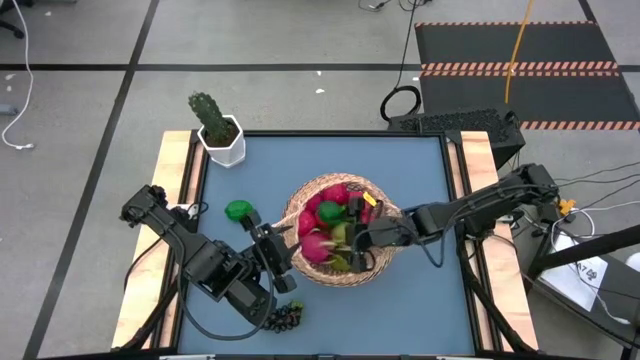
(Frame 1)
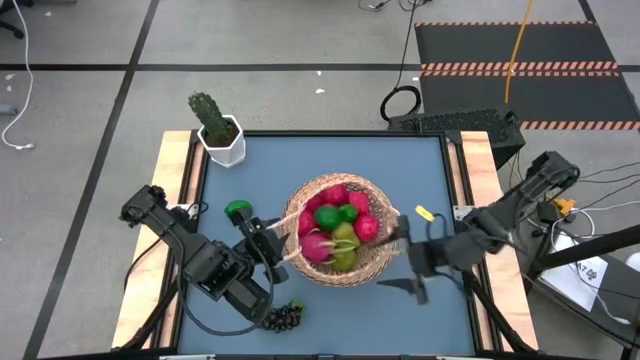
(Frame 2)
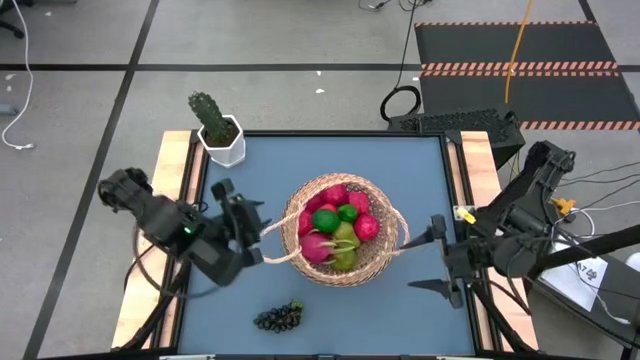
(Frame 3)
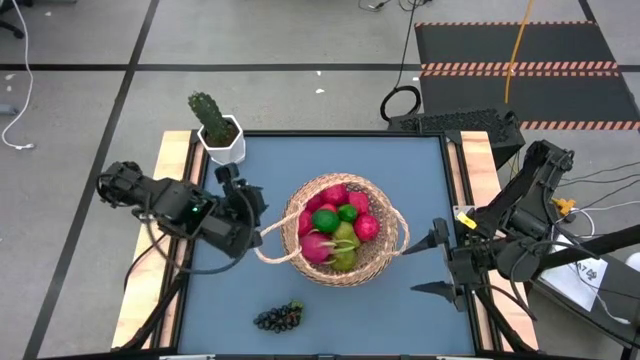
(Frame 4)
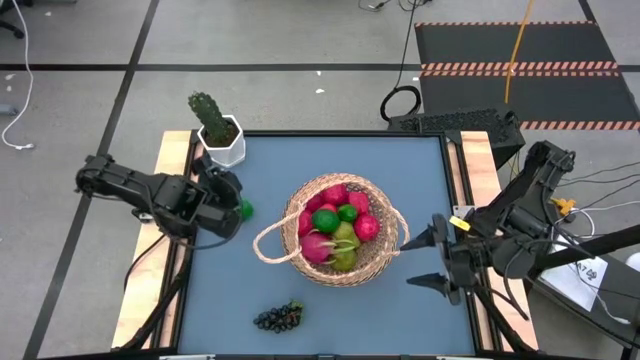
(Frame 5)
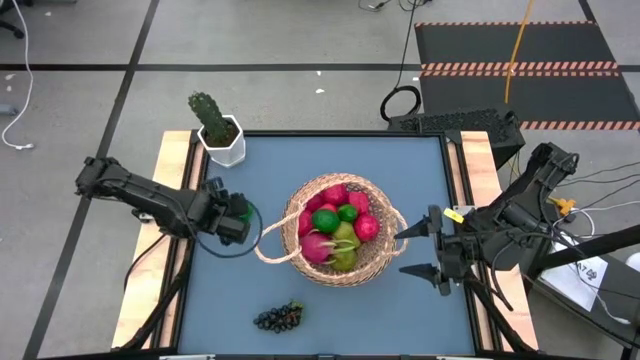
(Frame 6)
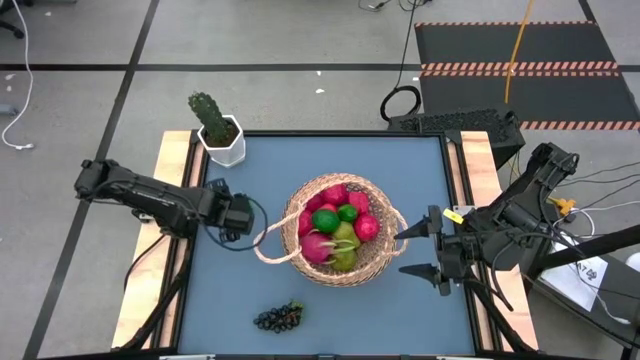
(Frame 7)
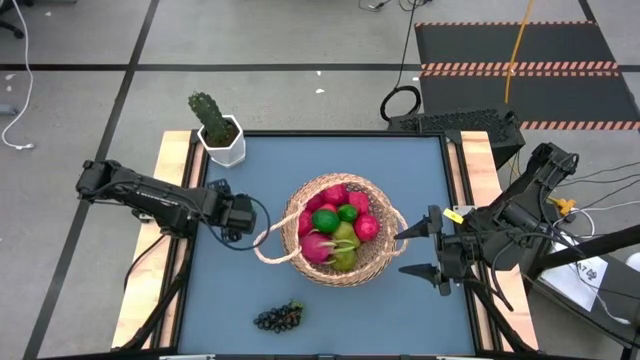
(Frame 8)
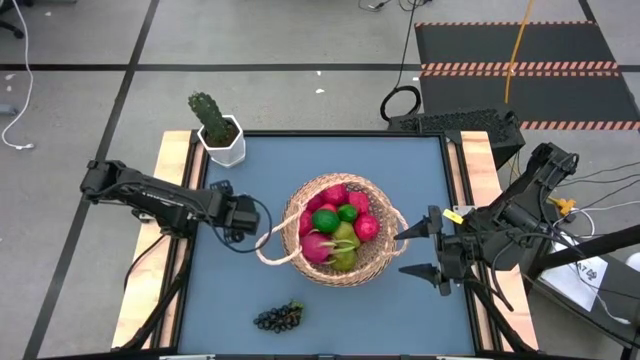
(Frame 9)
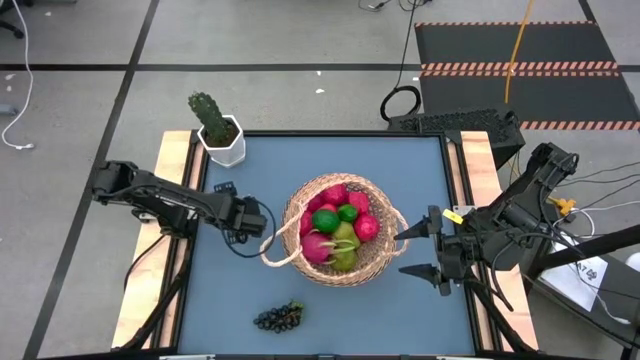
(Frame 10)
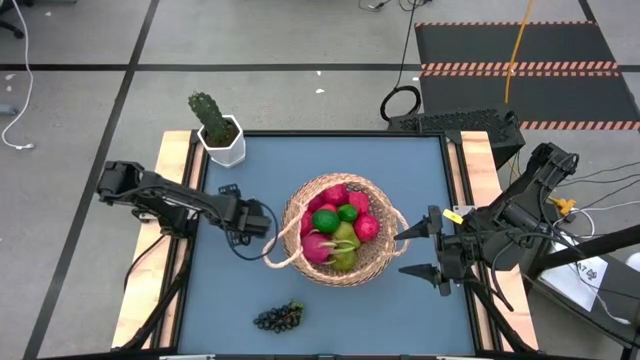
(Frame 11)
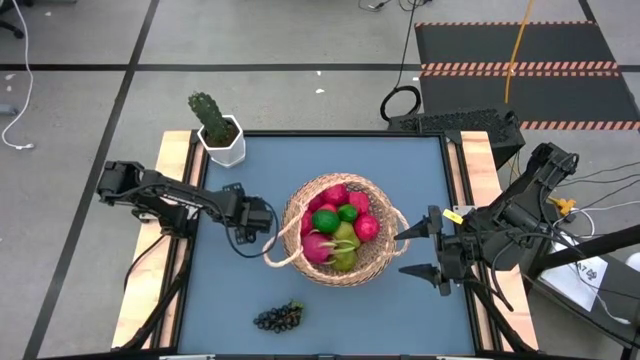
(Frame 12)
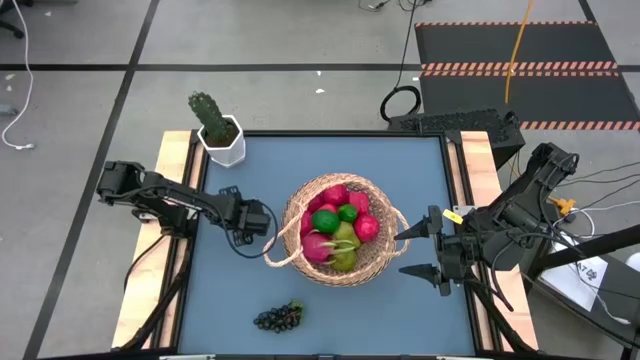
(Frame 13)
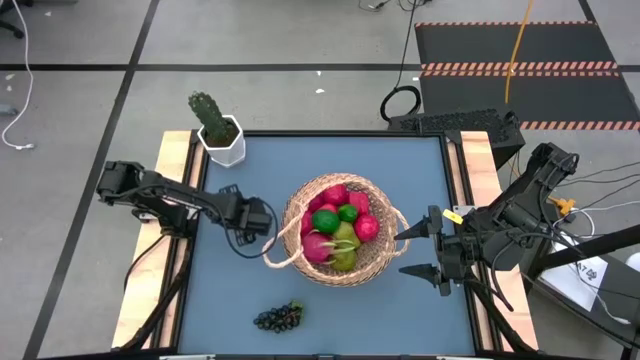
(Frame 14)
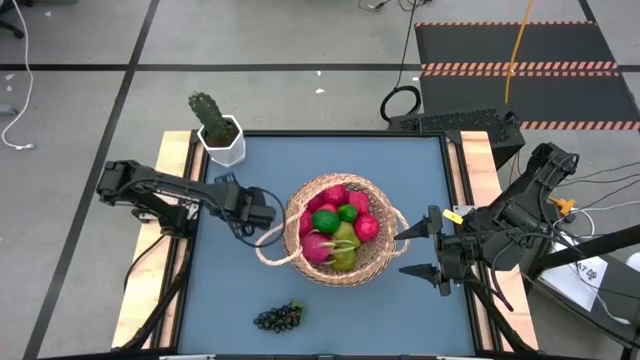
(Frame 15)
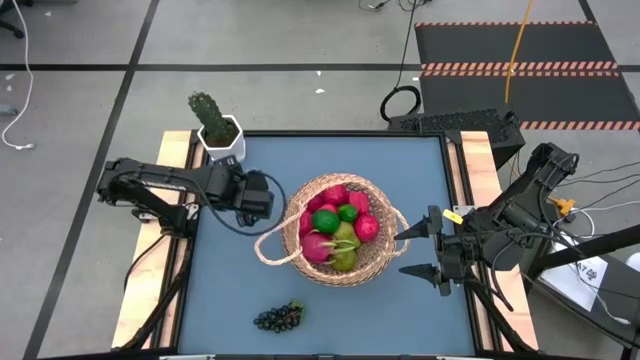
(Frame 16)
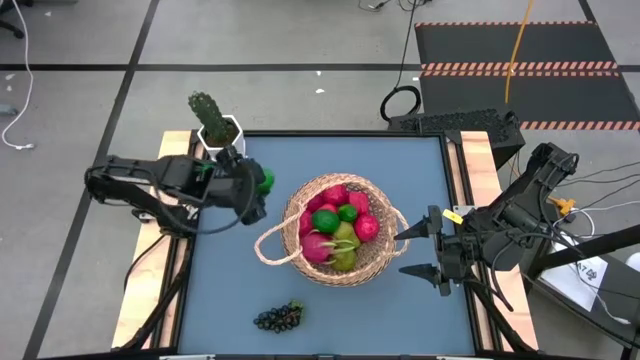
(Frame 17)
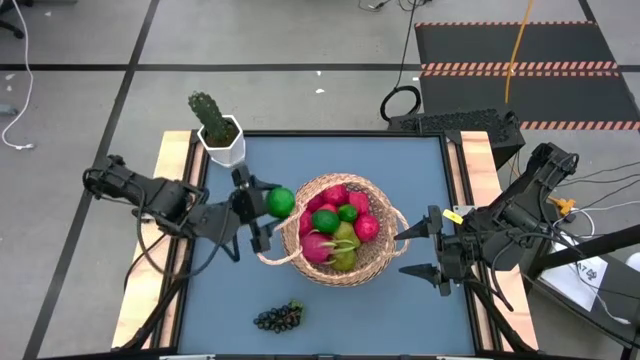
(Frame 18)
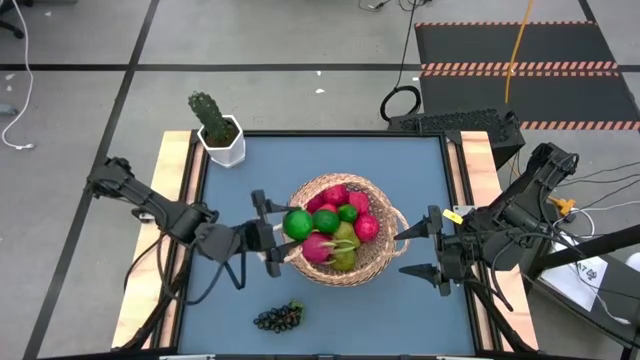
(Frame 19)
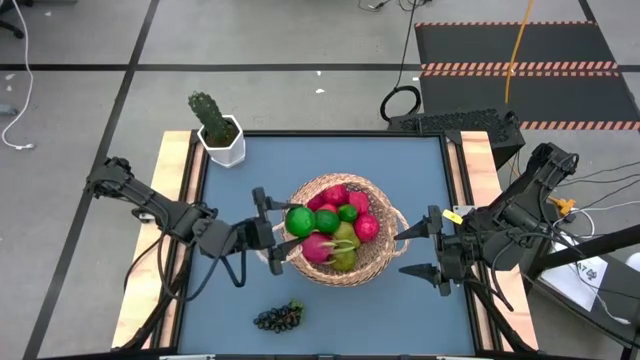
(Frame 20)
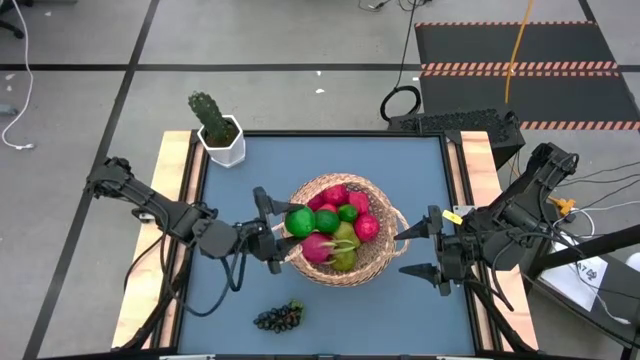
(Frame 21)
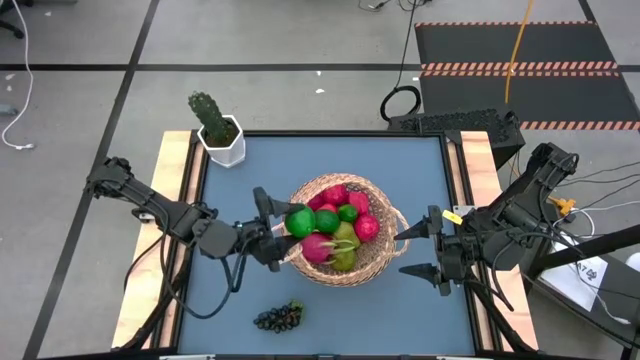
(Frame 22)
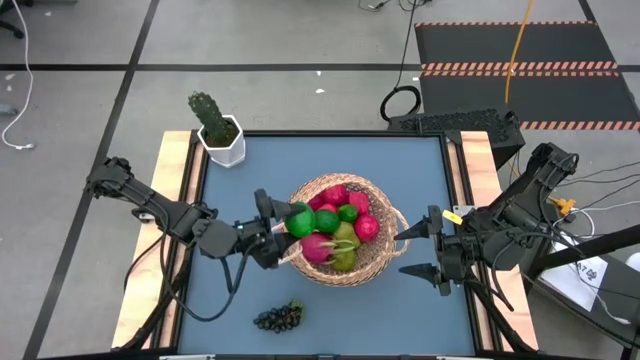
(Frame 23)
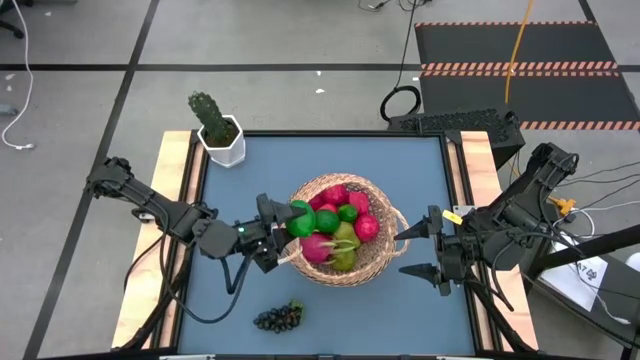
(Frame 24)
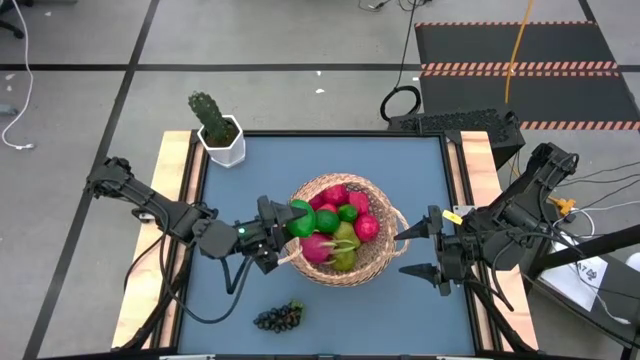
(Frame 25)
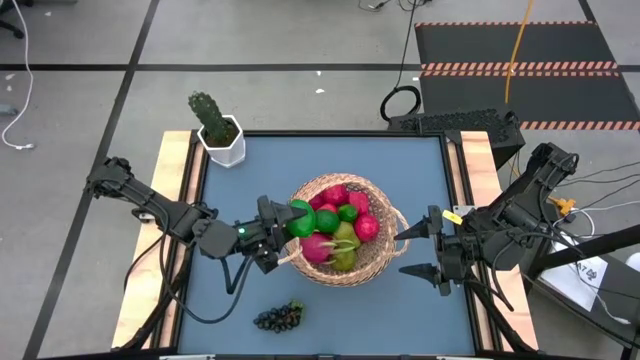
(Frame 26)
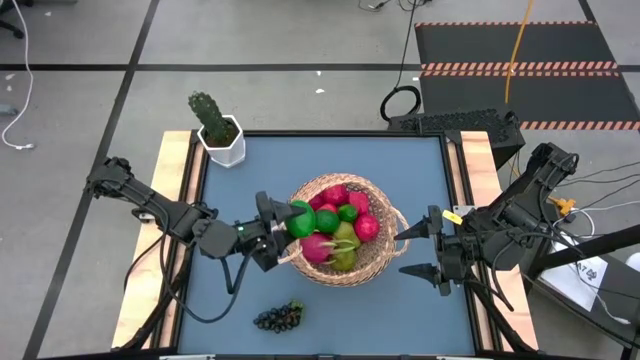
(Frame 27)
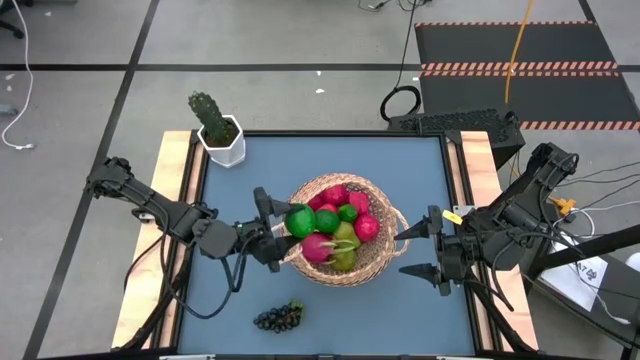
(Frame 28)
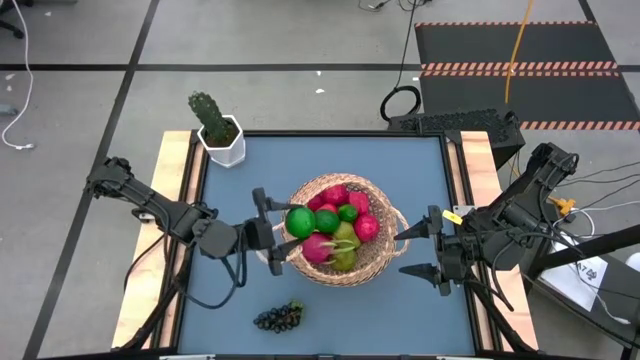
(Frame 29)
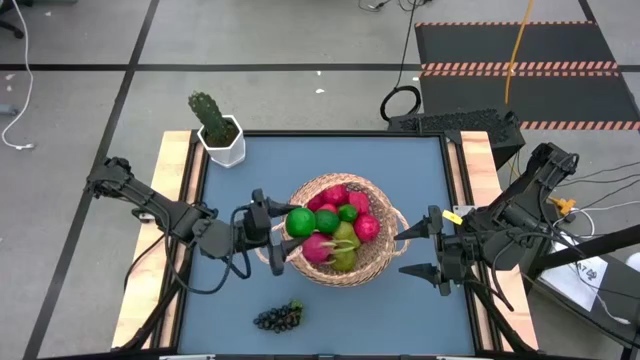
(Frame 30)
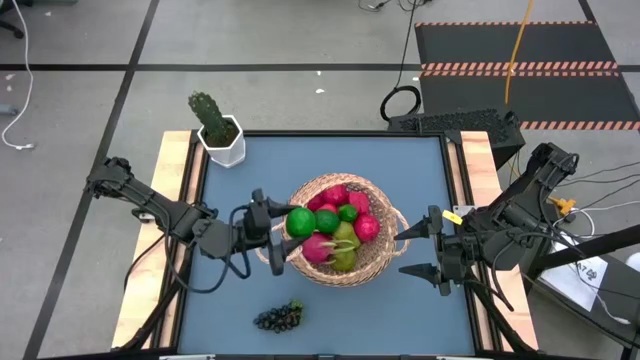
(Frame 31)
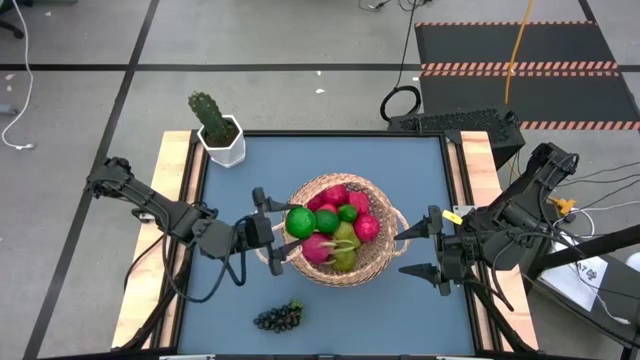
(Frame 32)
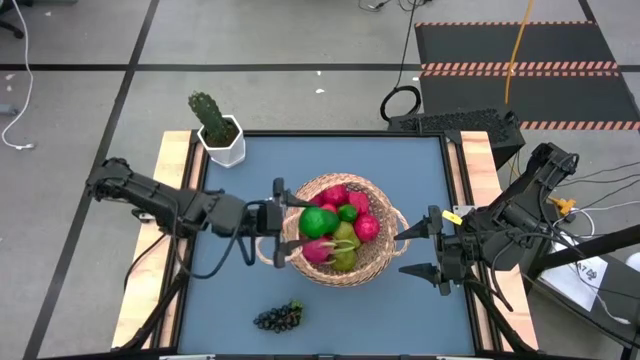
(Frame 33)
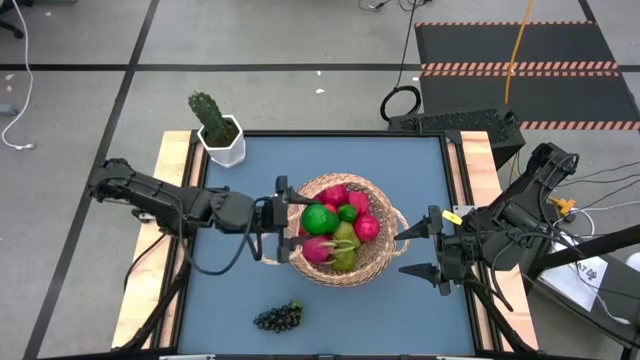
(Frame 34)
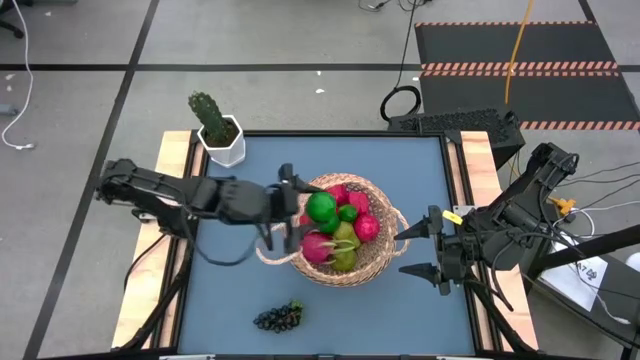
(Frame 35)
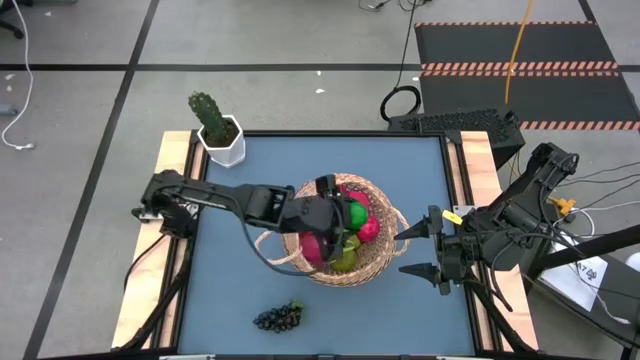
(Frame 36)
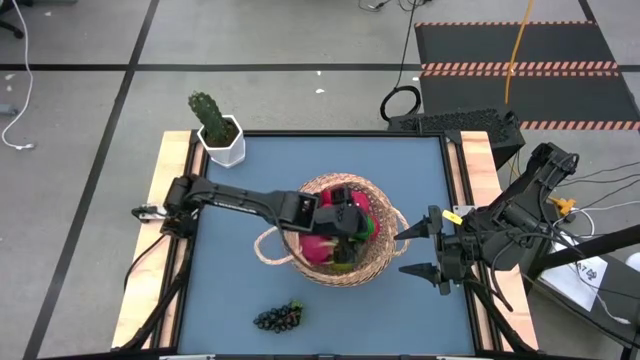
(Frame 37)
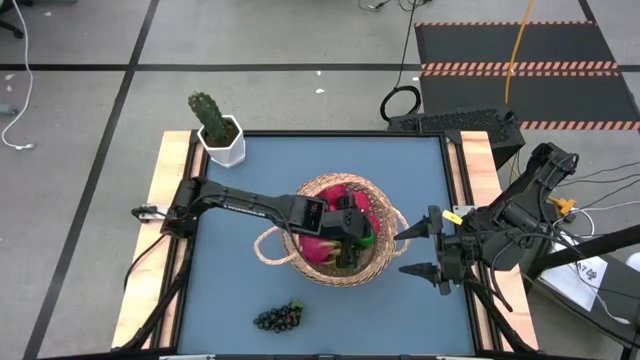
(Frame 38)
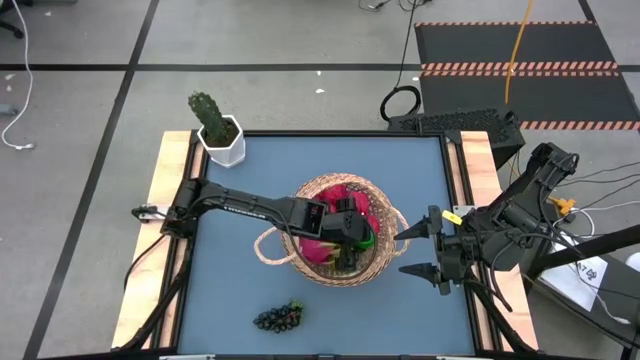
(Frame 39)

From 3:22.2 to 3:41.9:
Task: Build produce basket
Put the dark green lime into the brown basket

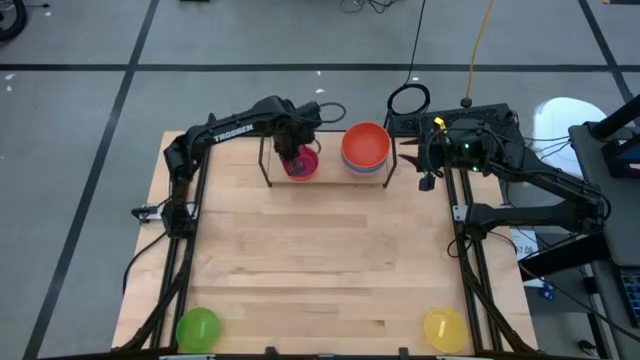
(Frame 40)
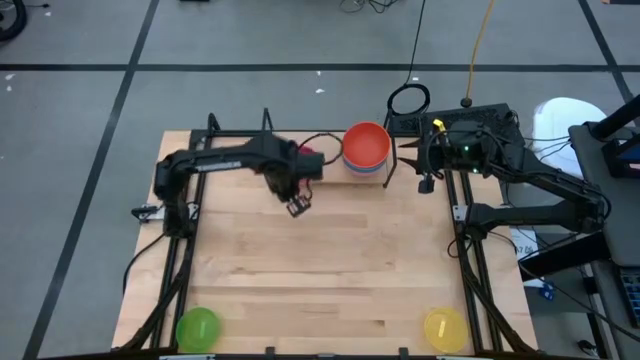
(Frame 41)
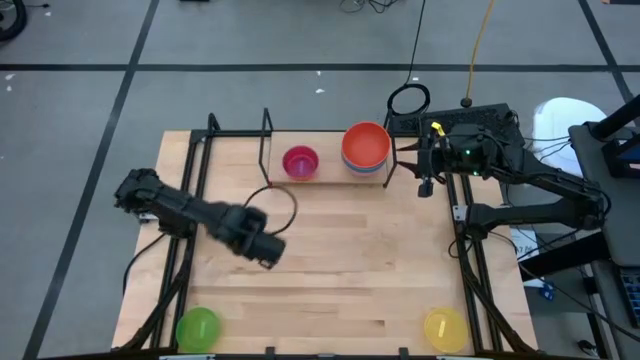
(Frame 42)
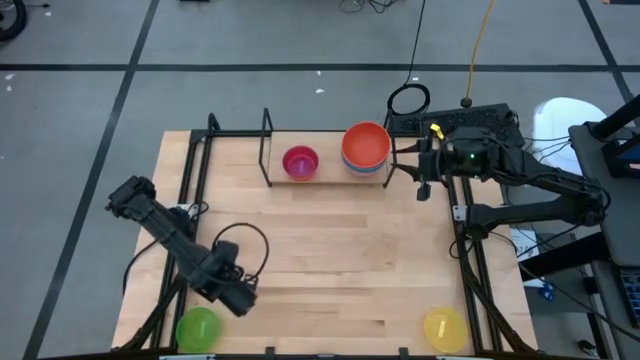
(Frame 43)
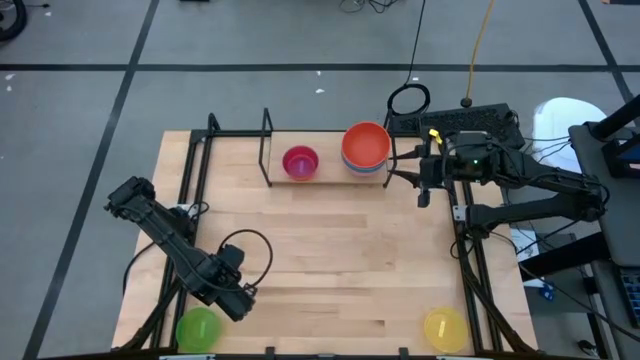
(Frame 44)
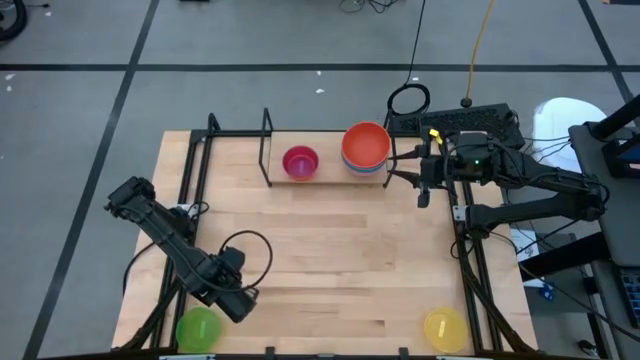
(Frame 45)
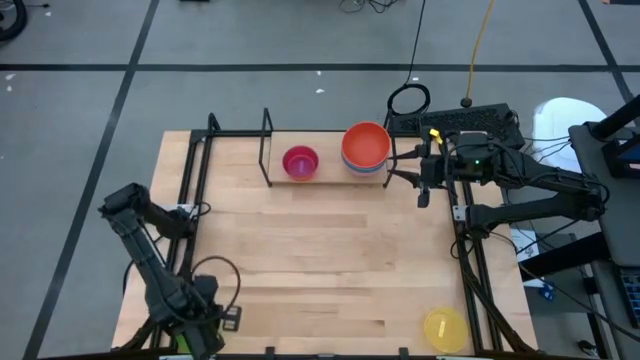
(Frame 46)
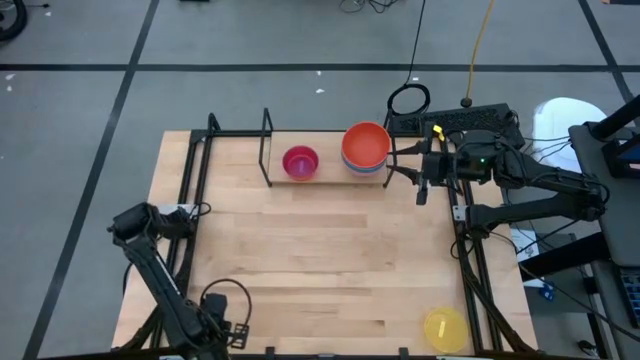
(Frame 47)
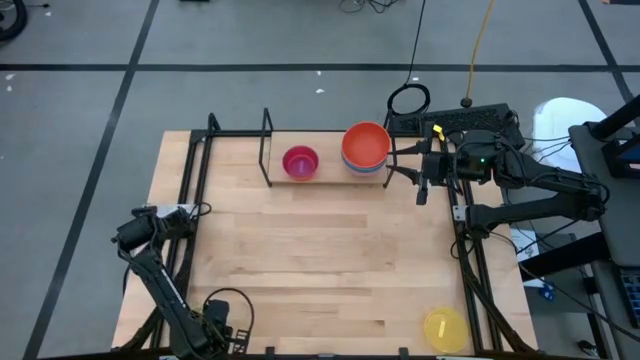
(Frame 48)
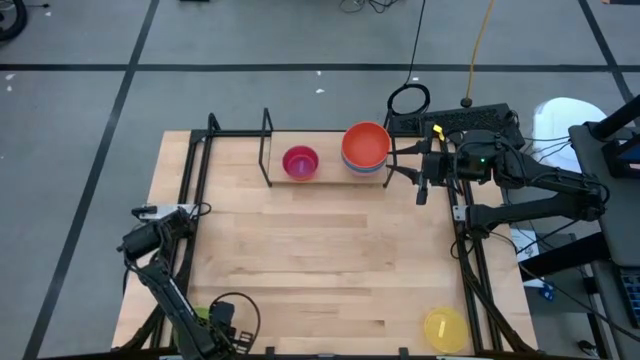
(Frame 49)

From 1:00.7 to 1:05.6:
Task: Place and stack bowls onto a shelf
Stack the green bowl on top of the purple bowl on the shelf
